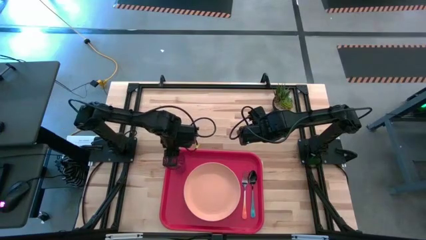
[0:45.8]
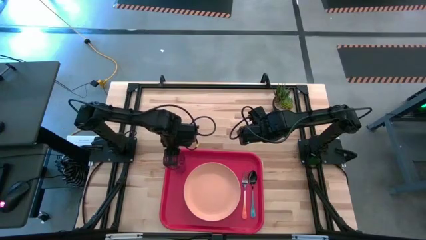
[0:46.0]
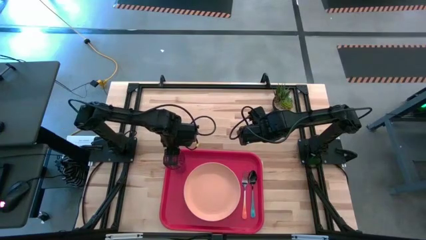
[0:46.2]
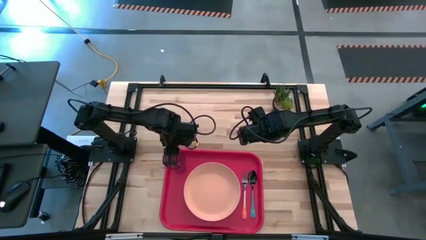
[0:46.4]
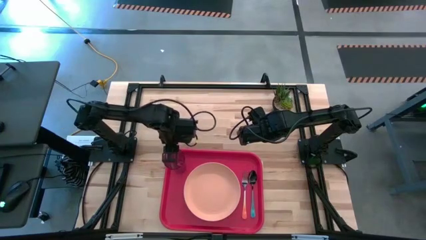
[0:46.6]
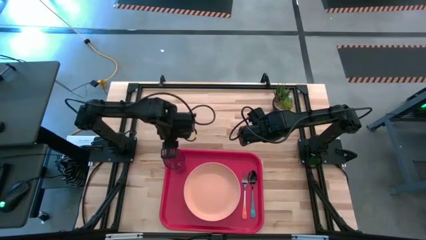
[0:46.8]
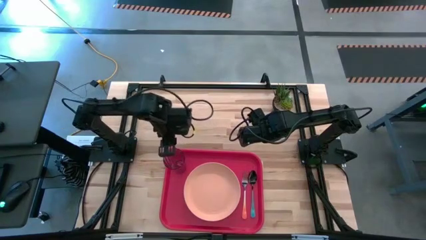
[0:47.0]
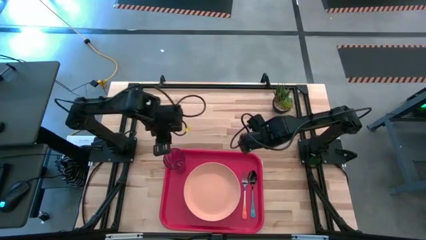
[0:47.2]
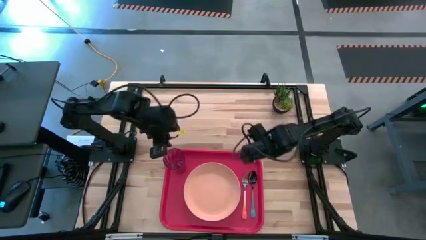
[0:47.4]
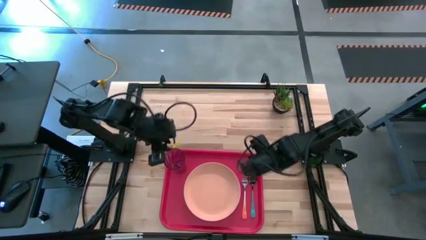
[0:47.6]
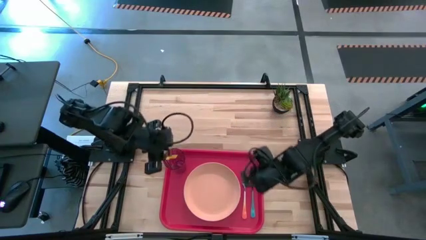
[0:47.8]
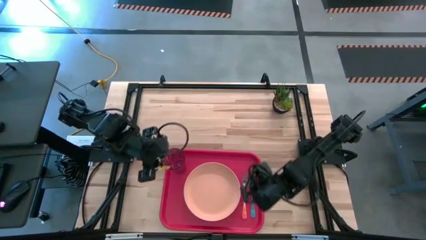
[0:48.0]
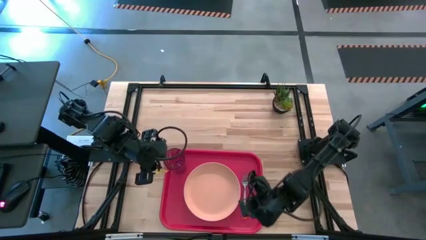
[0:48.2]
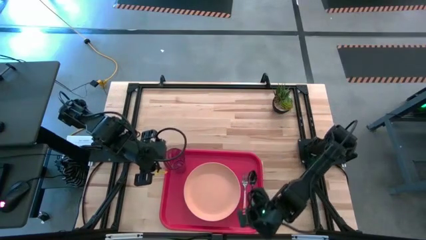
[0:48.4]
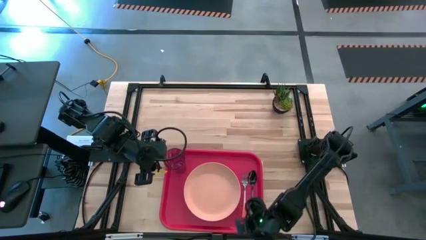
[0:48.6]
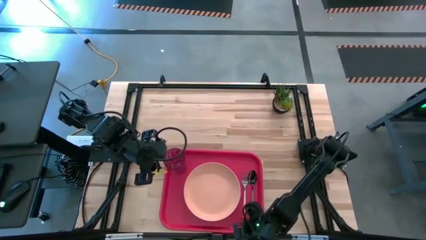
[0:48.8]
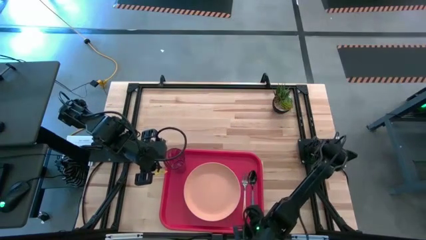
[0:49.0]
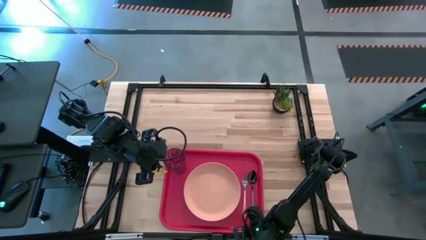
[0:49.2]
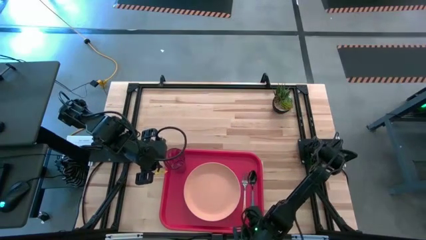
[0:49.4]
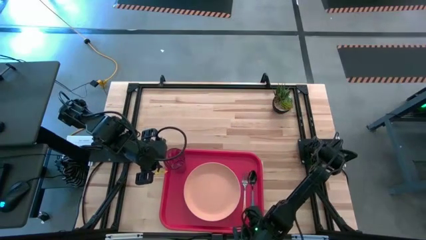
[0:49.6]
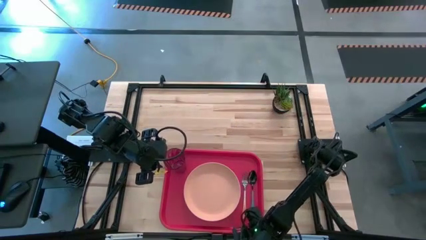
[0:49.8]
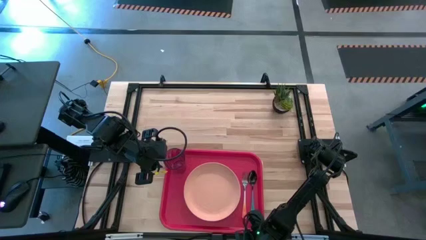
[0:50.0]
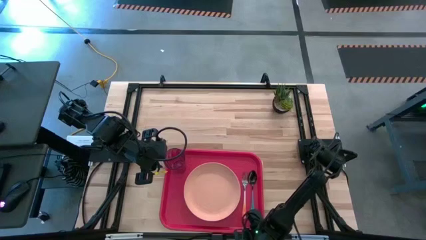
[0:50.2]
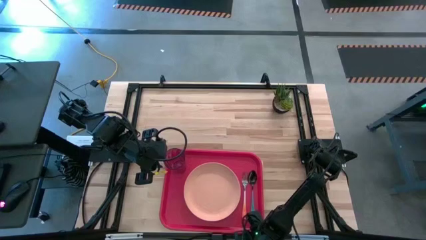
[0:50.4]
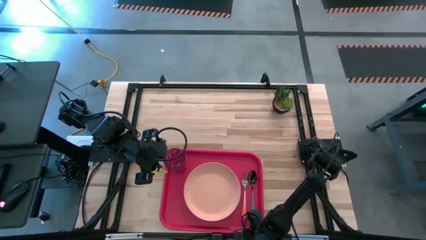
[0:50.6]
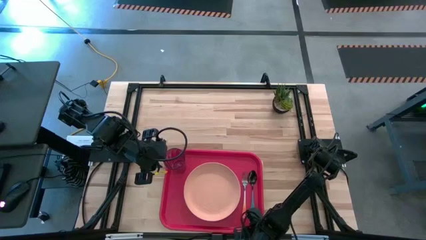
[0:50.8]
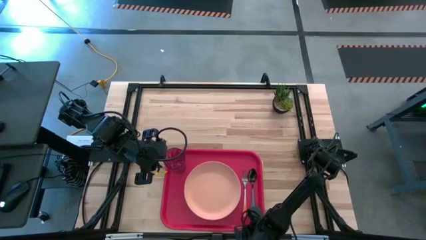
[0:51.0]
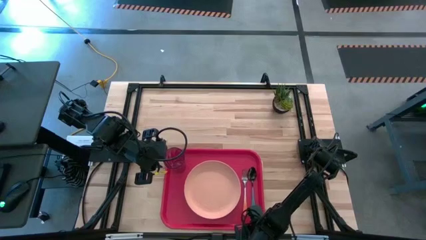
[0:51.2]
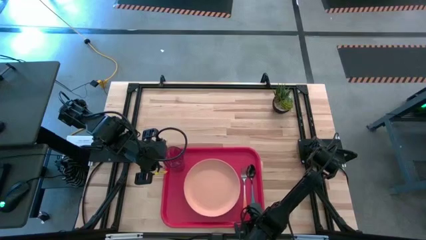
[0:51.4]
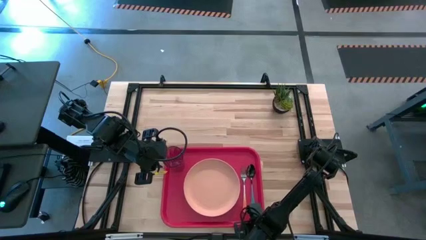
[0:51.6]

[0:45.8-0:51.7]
Task: Pick and place plate/cup/fork/spoon on tray
Adjust the red serving tray

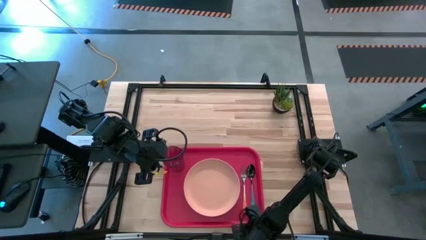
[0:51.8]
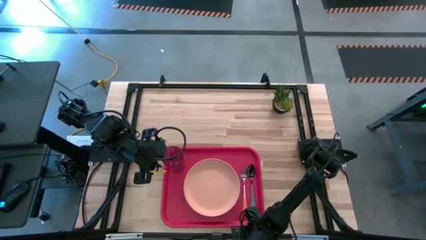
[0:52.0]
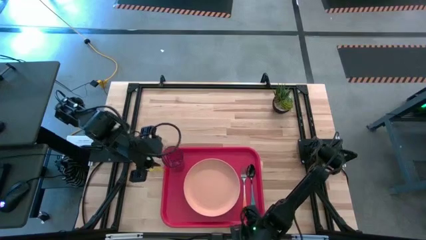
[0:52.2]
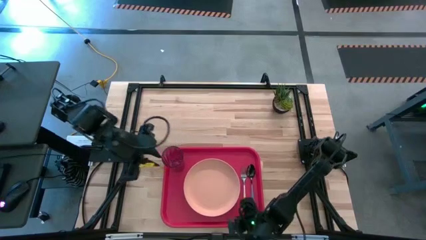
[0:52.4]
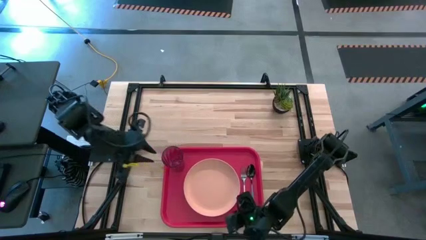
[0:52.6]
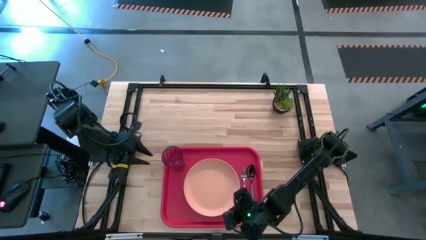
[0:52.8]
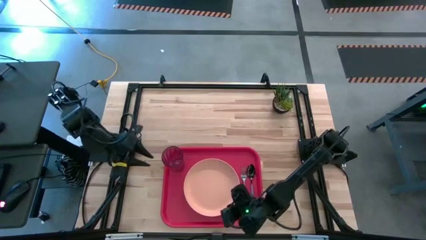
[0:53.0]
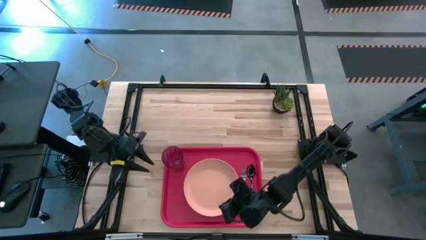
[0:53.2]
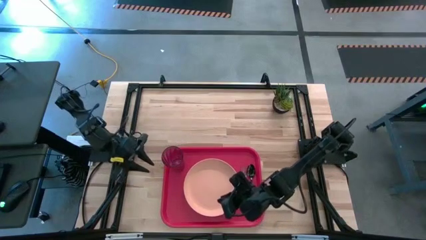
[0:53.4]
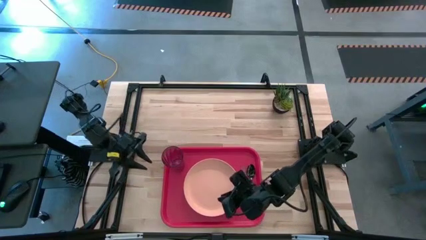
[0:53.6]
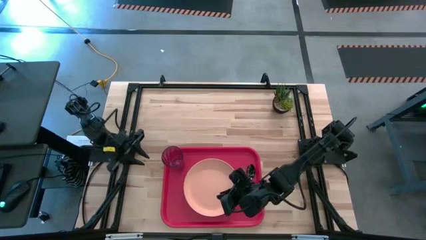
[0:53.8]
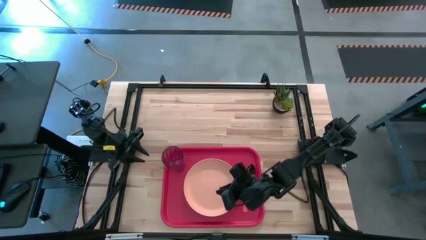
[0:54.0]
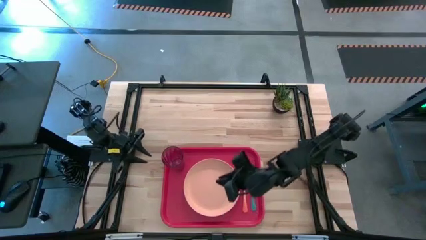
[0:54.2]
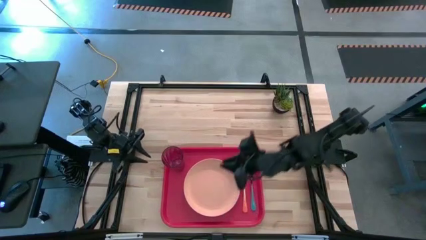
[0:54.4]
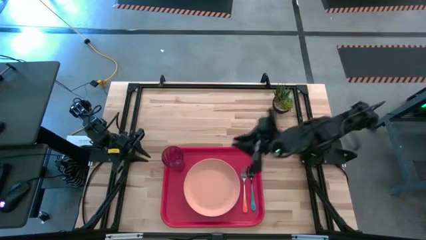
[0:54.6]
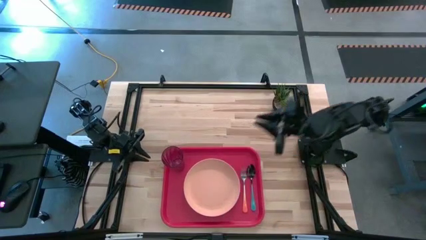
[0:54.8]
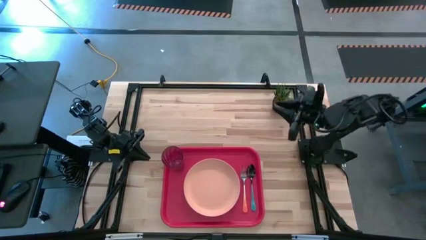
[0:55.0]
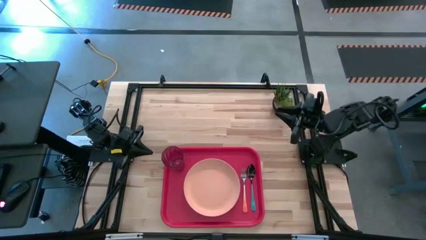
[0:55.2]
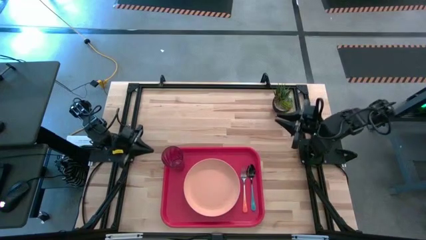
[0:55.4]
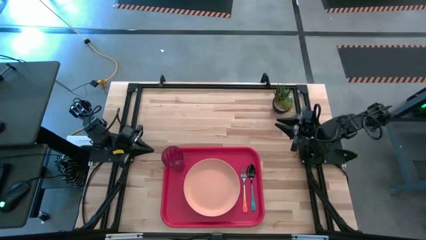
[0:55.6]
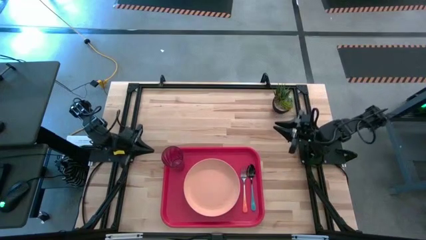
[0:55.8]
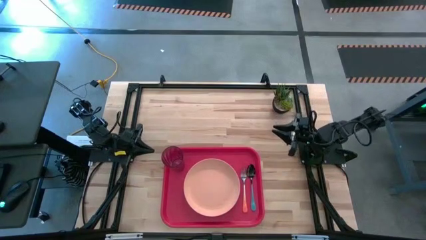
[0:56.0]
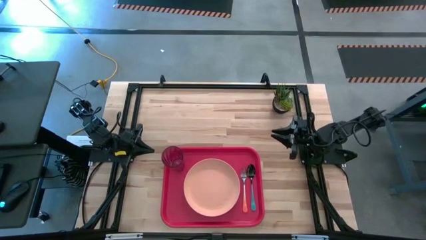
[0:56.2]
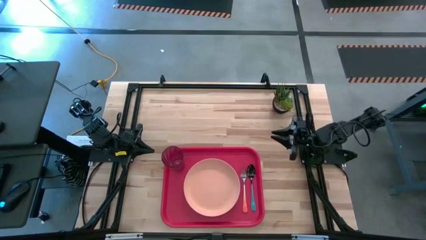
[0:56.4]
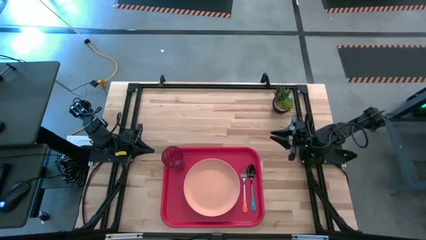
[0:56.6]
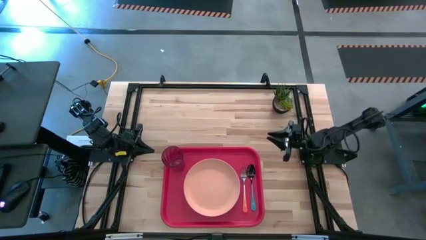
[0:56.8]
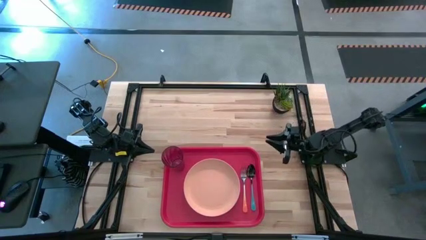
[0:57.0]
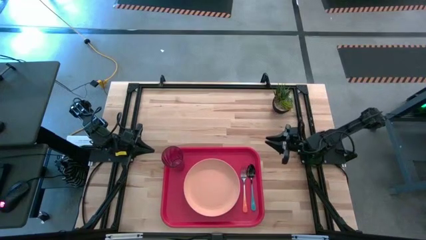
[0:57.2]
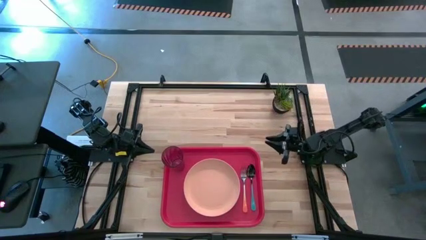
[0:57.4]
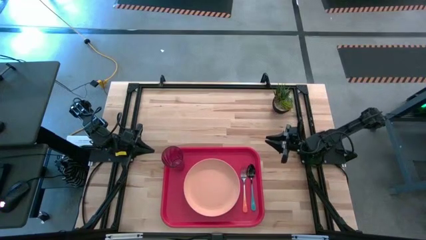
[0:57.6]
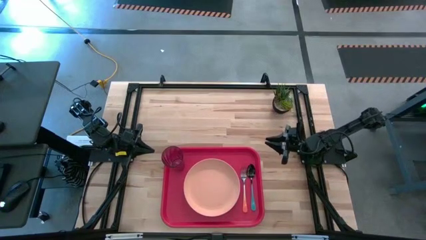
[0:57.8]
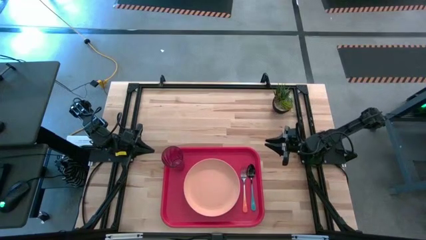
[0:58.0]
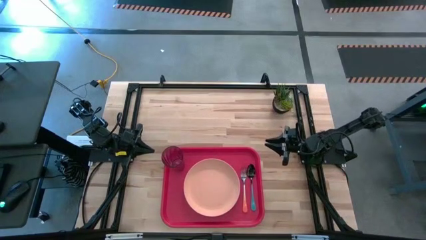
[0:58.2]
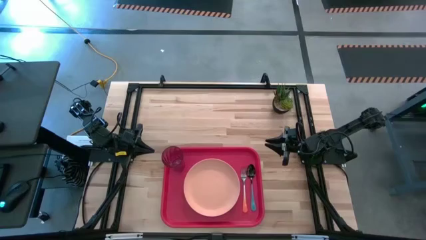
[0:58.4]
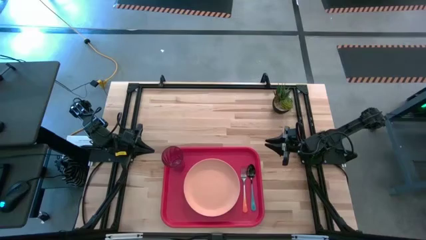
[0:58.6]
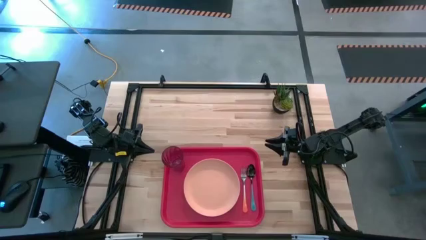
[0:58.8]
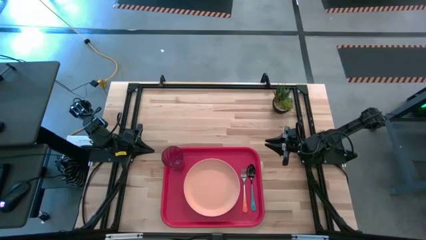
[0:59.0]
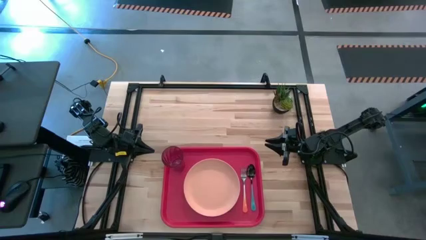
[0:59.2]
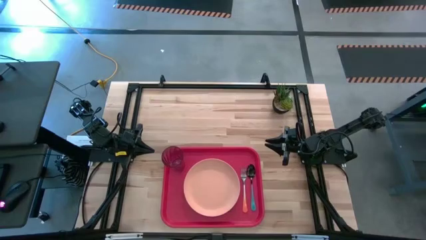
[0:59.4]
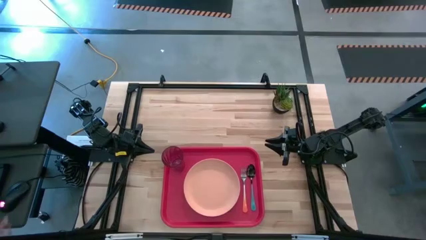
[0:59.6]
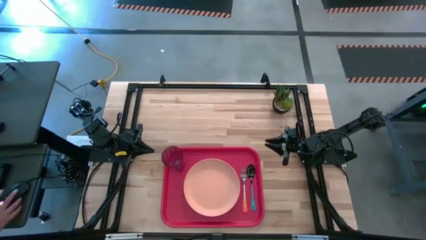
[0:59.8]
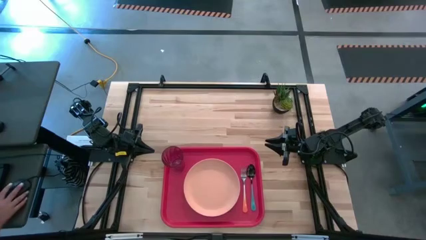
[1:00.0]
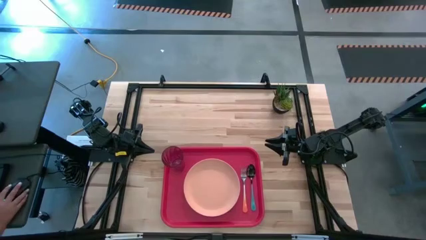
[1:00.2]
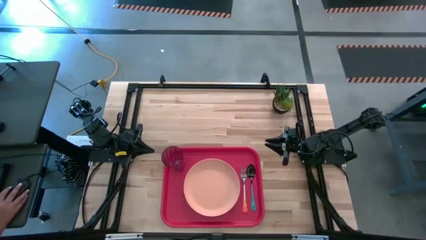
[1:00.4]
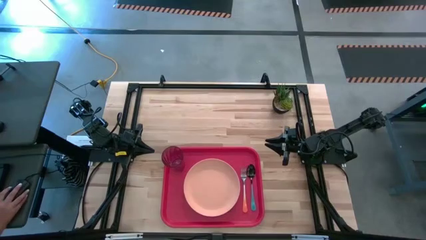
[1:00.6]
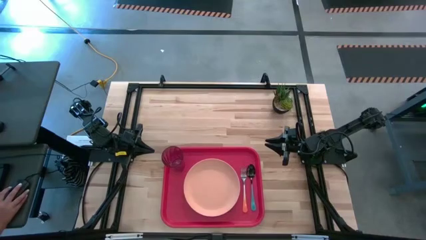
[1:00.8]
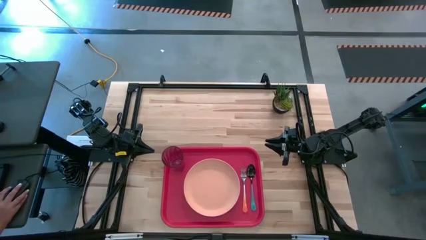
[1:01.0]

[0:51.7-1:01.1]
Return to Home Position
